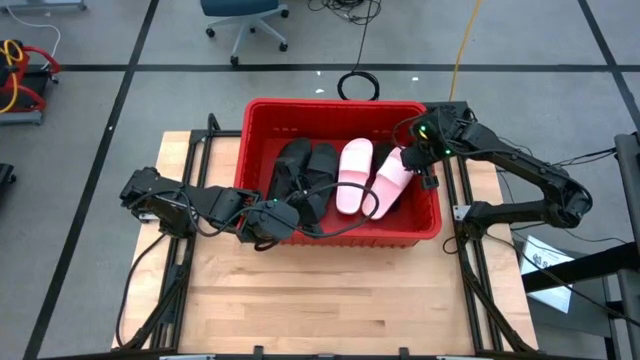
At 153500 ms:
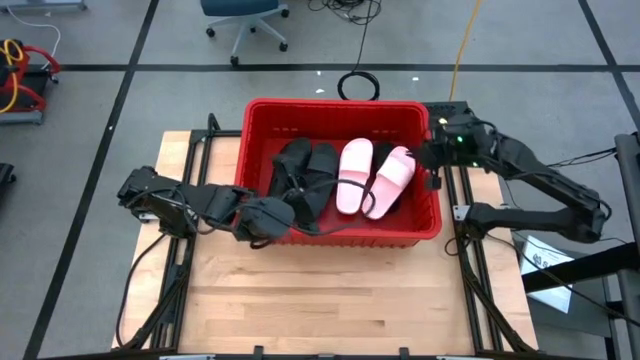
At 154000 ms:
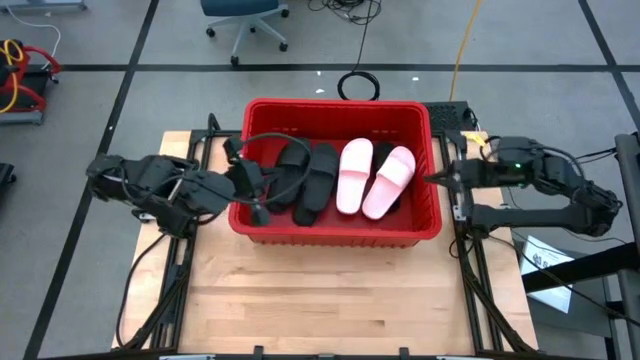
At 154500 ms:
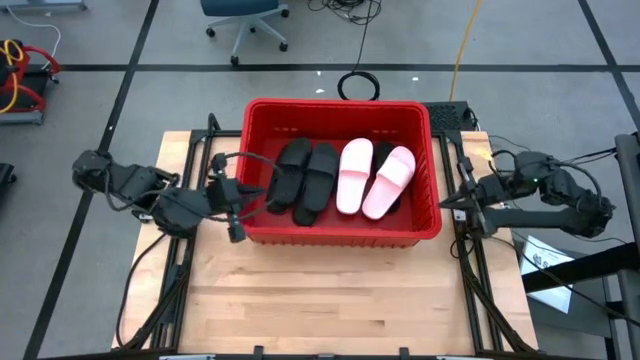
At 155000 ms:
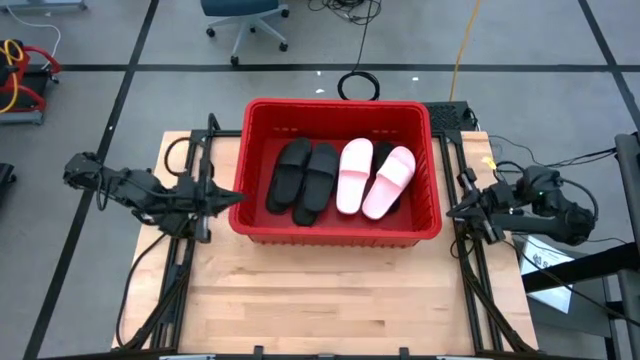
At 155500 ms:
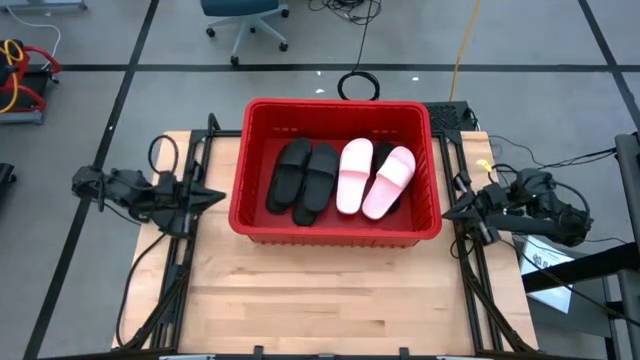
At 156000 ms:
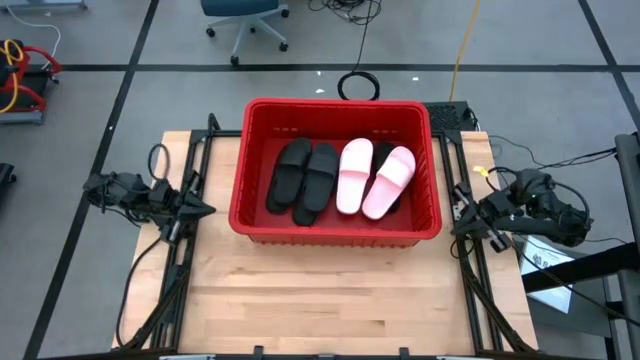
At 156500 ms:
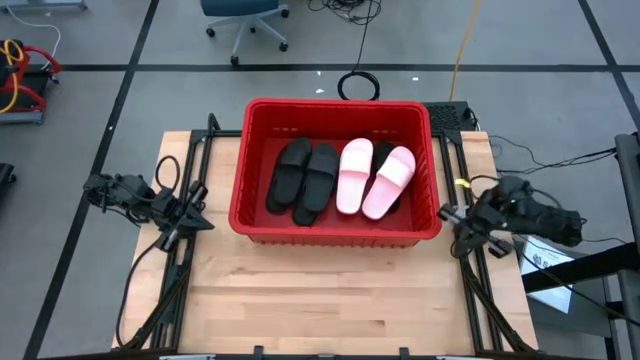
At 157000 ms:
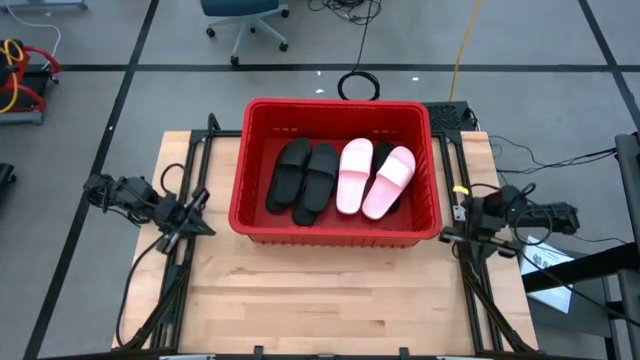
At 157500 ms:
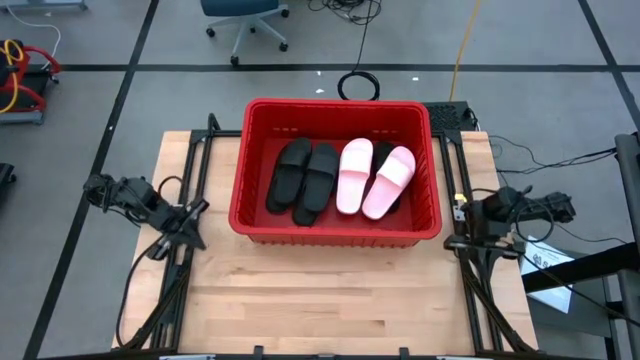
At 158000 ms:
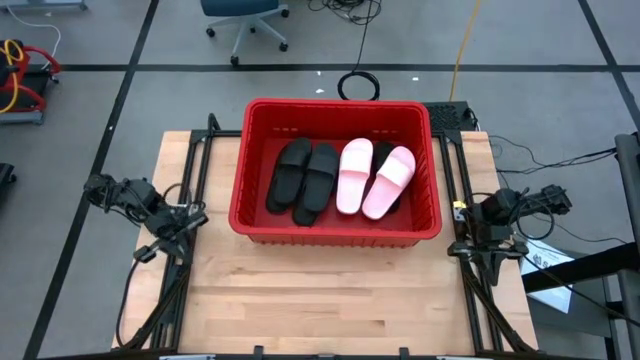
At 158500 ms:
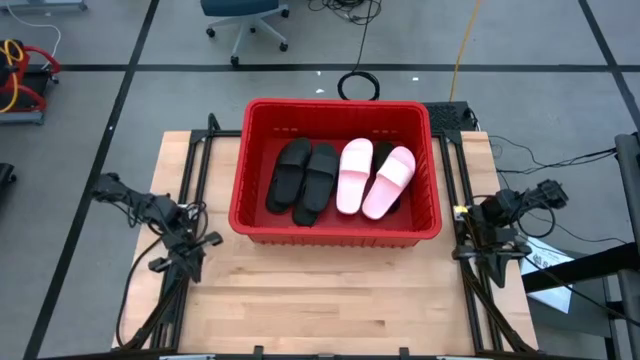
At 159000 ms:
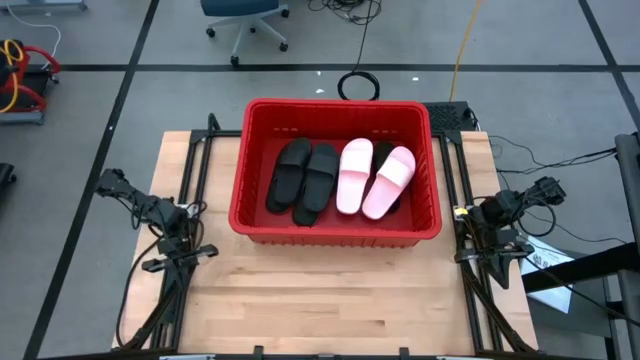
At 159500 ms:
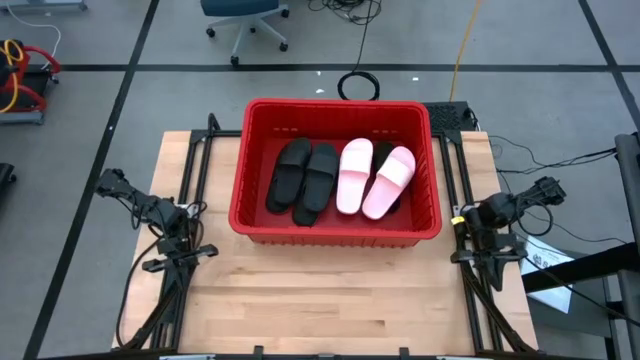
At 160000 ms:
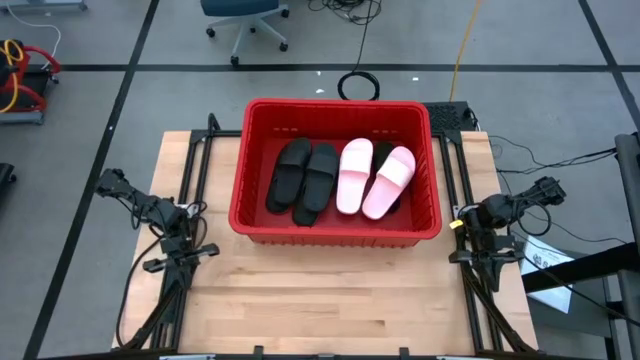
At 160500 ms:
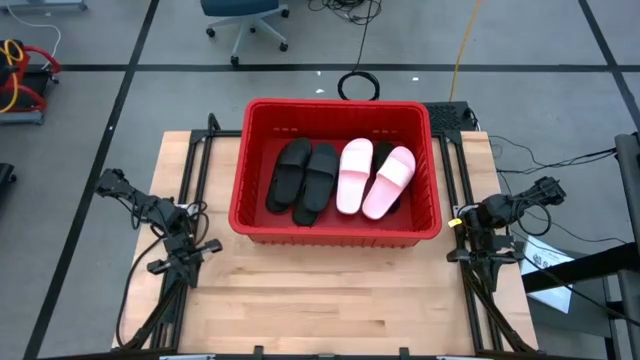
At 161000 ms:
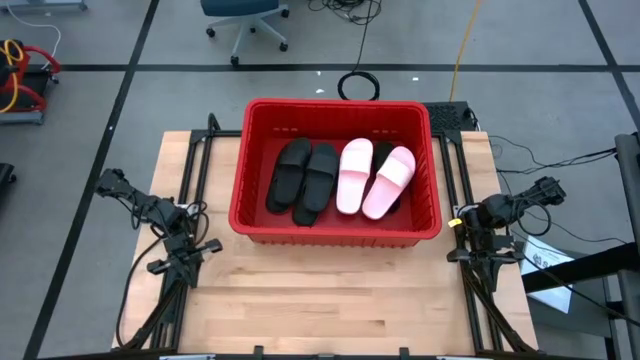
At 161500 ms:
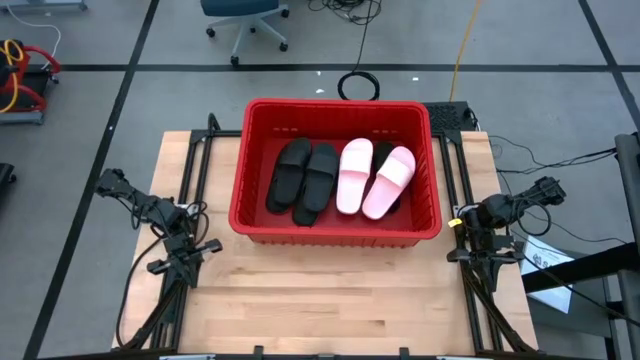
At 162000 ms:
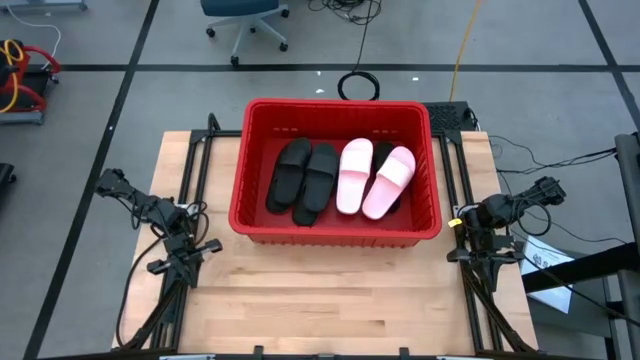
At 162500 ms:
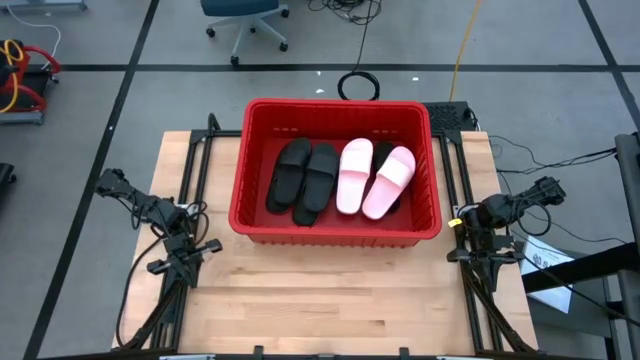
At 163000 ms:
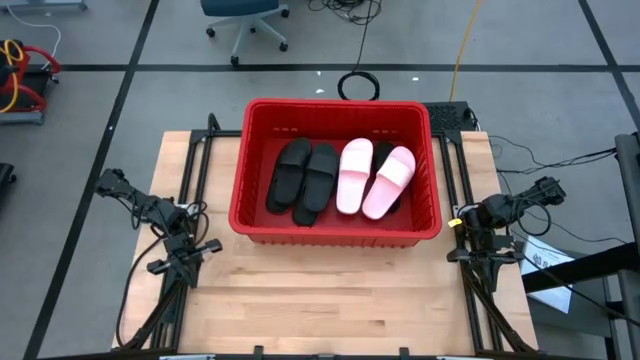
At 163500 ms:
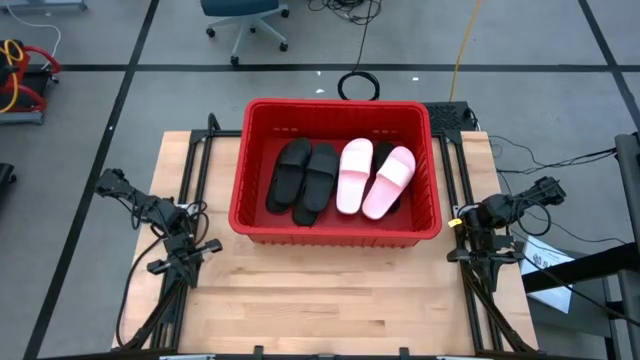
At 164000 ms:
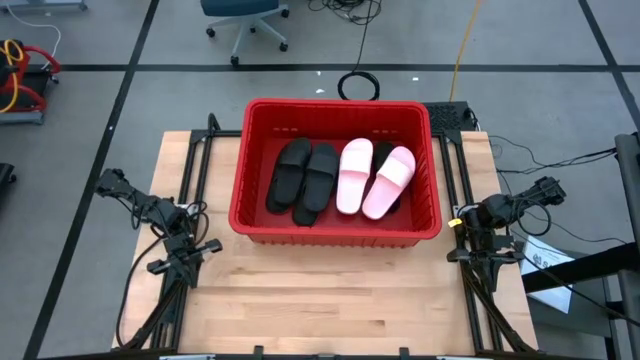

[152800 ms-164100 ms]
Task: Pick and place slides into bin
Return to Home Position

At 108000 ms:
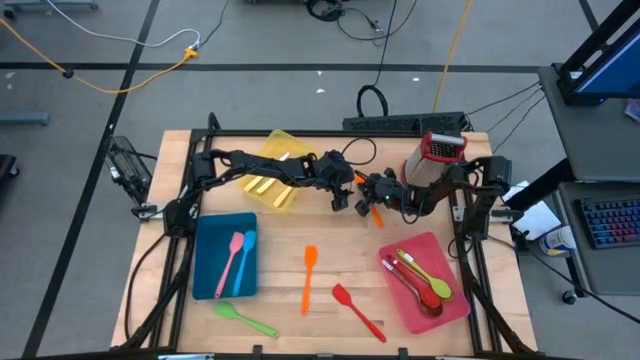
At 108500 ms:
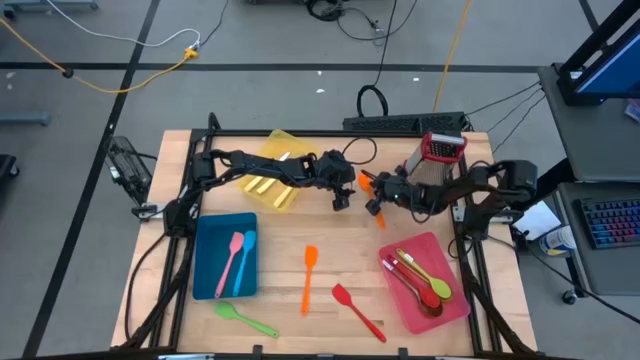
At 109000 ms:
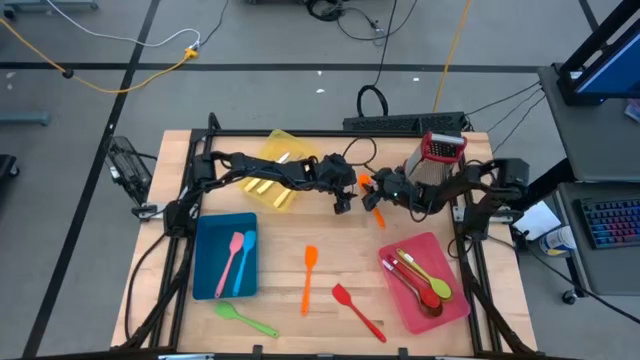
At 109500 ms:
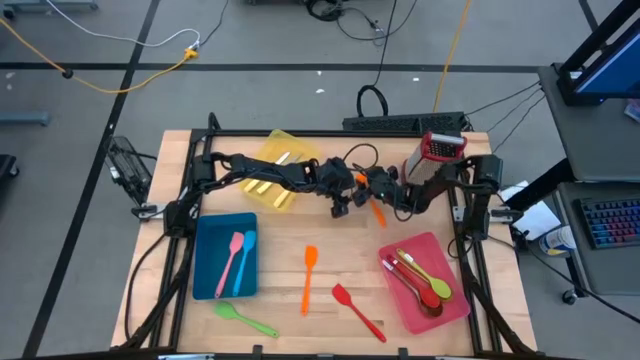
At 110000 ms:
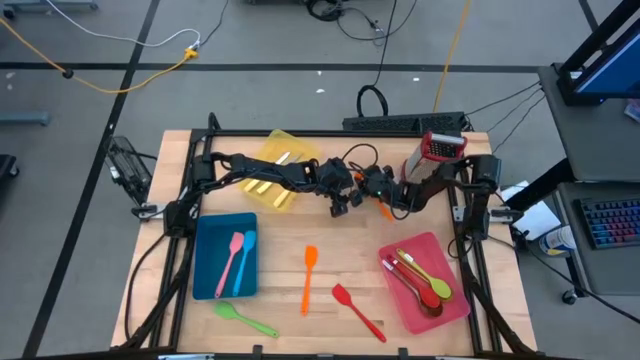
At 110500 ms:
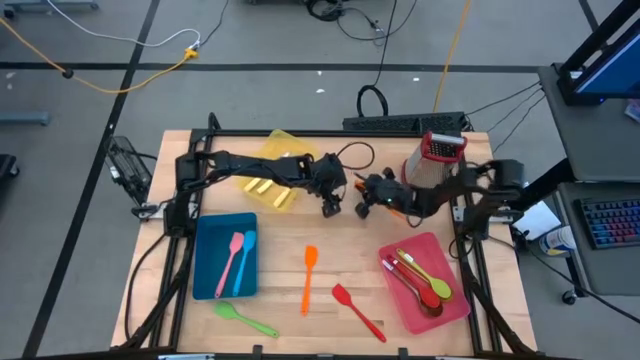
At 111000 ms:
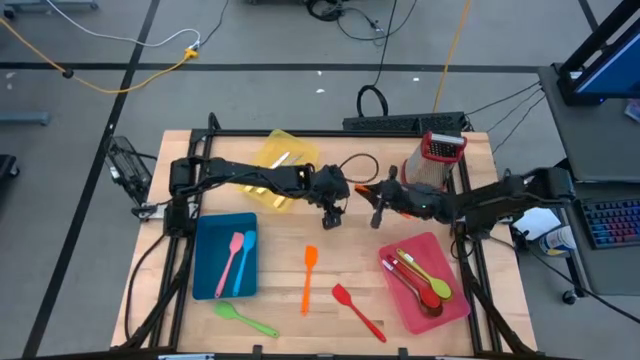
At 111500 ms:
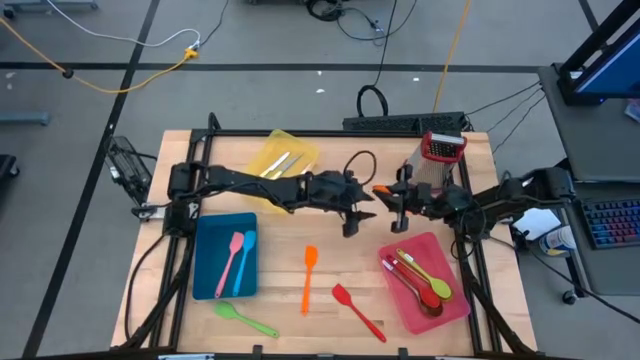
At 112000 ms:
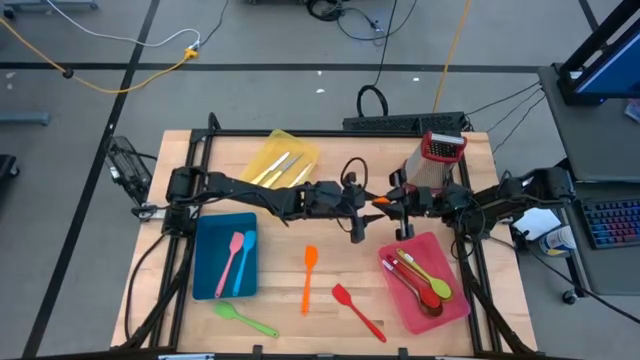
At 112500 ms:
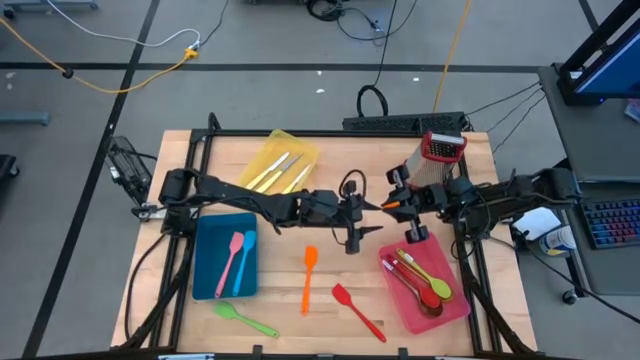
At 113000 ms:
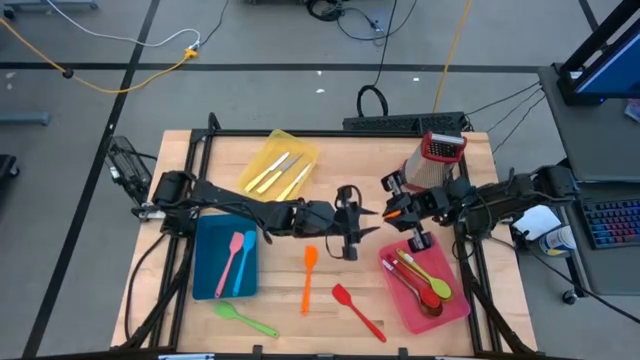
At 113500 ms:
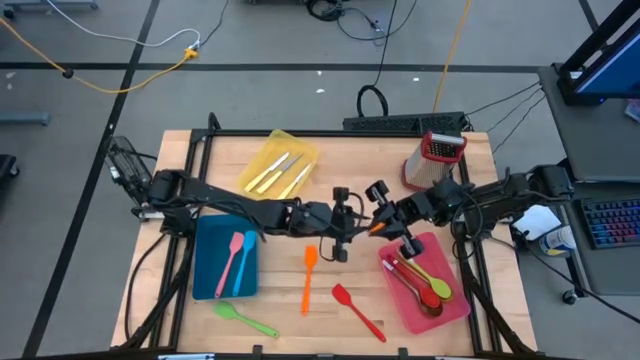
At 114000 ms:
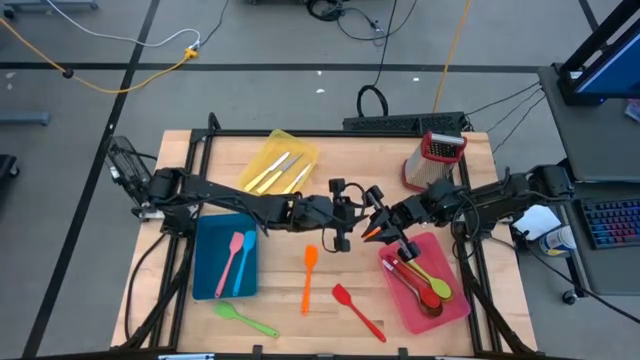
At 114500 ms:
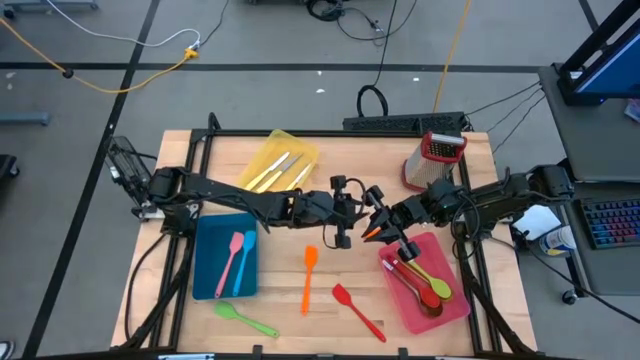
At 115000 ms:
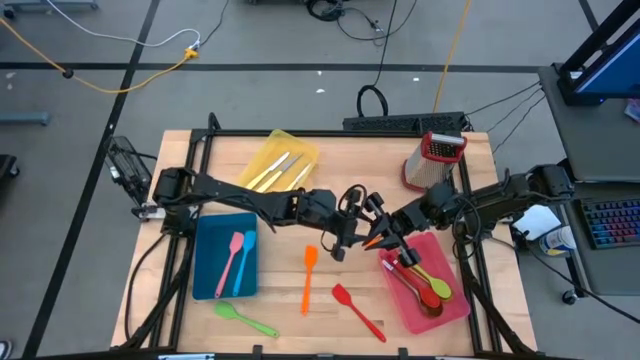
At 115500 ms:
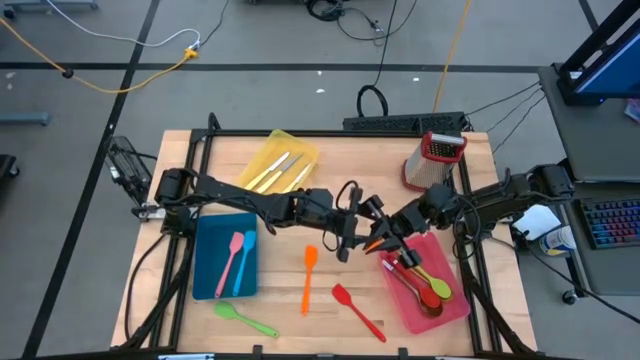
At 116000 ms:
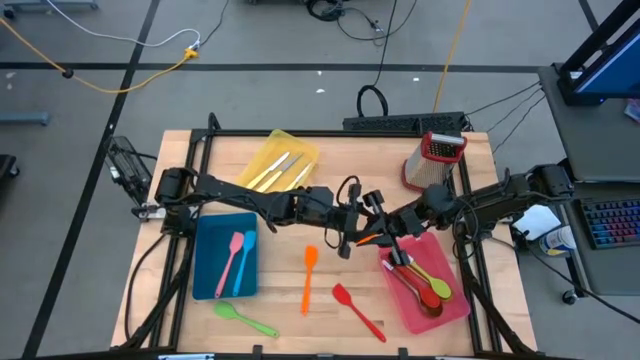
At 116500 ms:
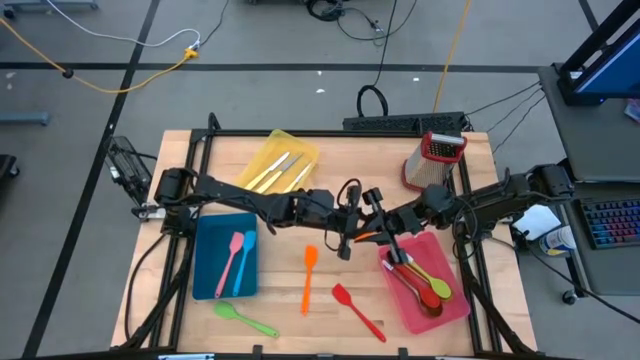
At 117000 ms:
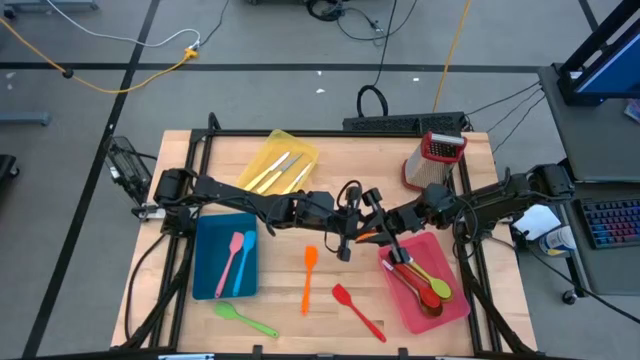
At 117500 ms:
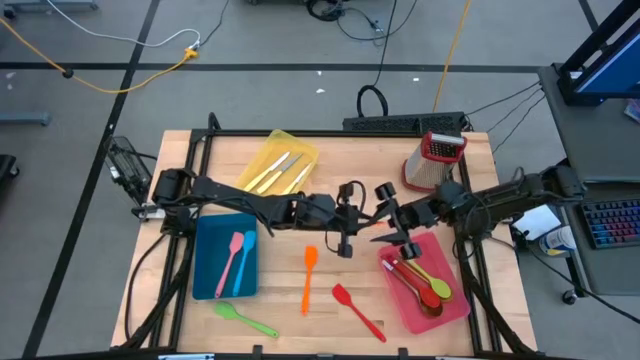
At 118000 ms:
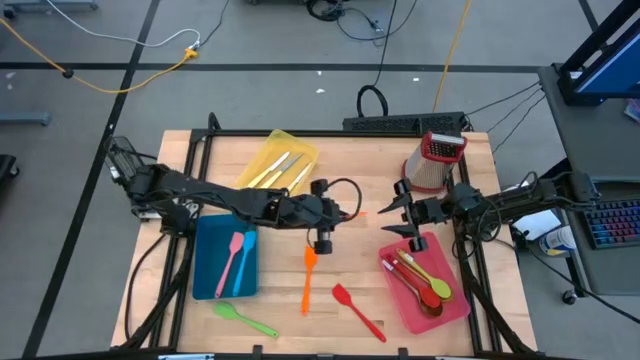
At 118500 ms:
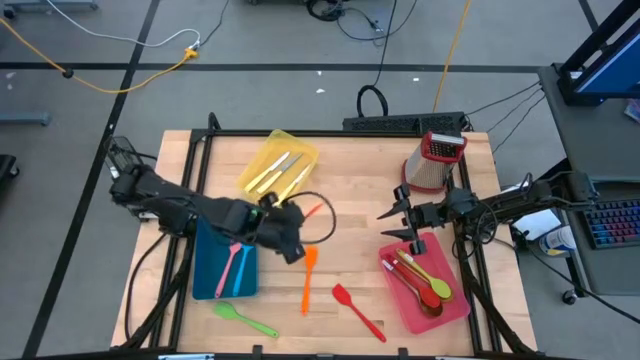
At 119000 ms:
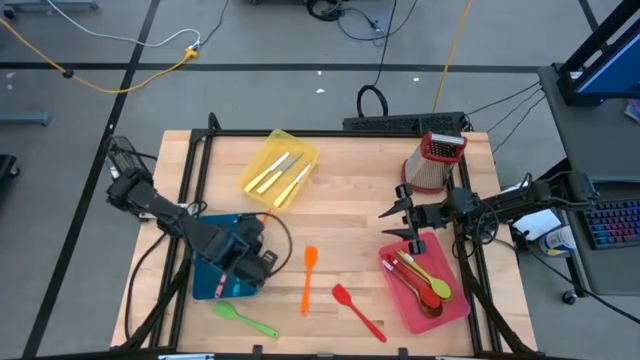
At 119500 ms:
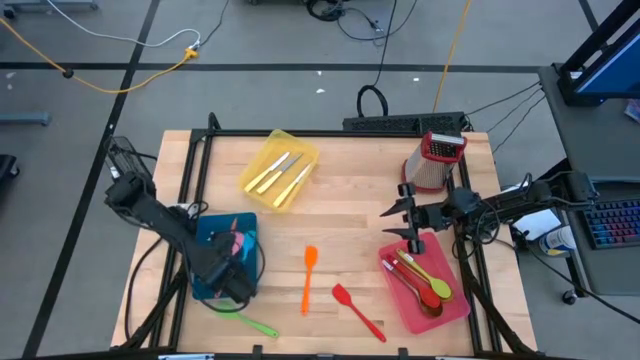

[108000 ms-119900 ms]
Task: Pick & Place Kitchen Items
Put the orange spatula into the blue bin
